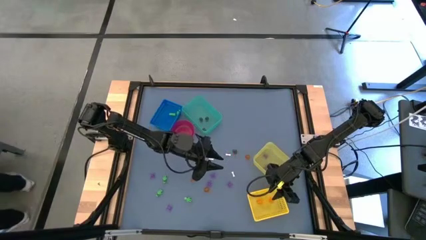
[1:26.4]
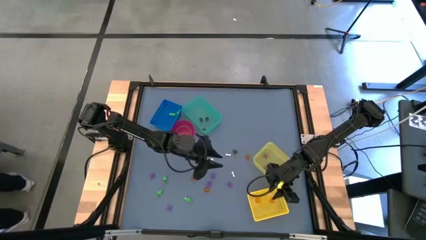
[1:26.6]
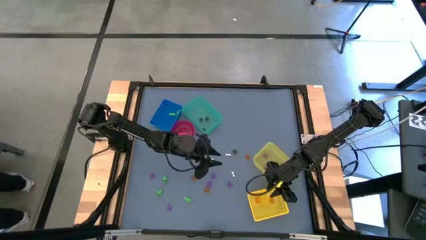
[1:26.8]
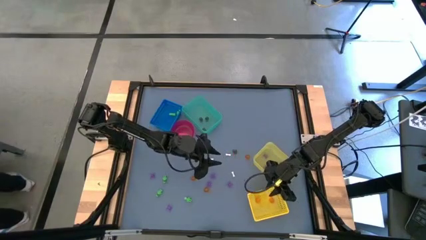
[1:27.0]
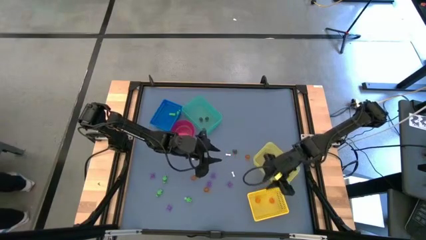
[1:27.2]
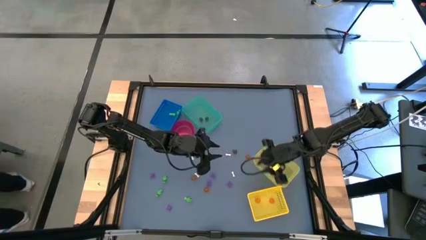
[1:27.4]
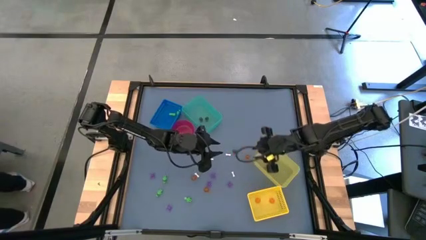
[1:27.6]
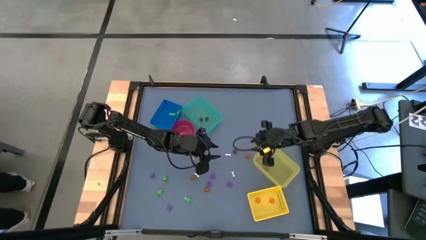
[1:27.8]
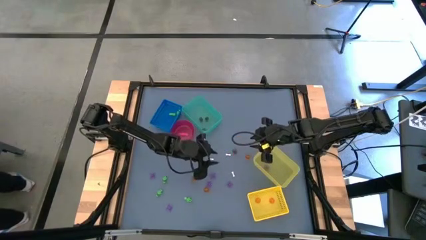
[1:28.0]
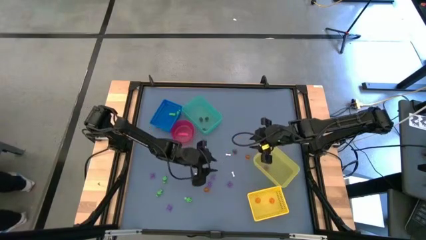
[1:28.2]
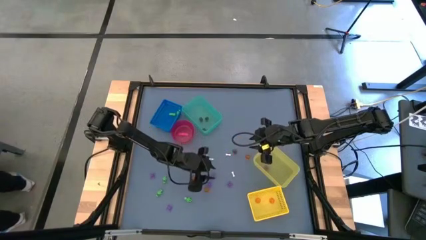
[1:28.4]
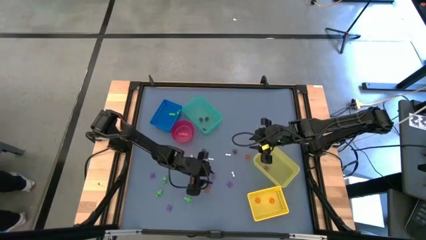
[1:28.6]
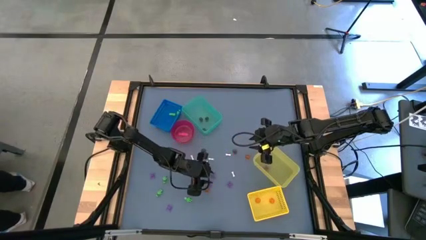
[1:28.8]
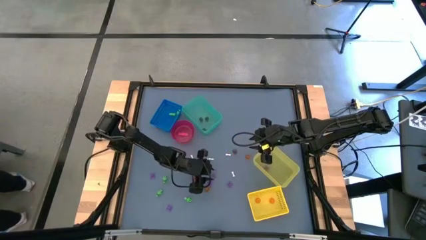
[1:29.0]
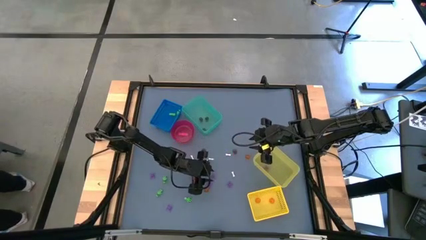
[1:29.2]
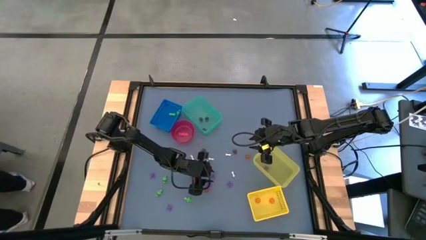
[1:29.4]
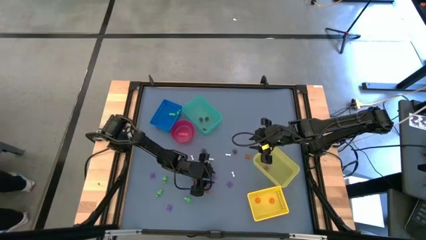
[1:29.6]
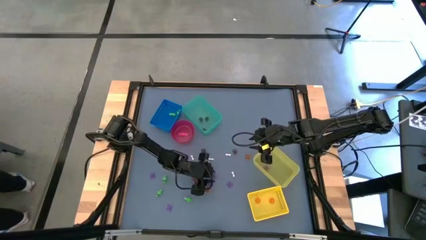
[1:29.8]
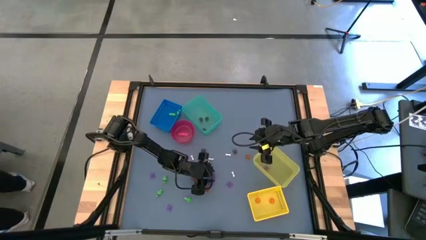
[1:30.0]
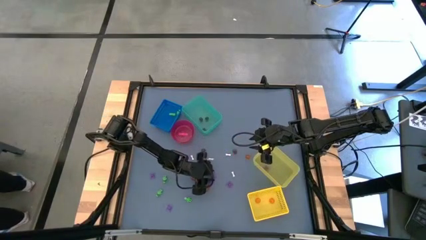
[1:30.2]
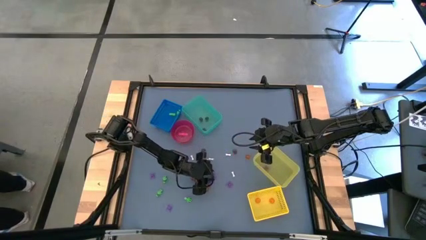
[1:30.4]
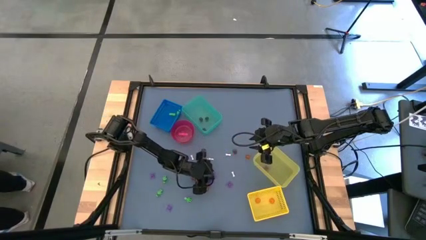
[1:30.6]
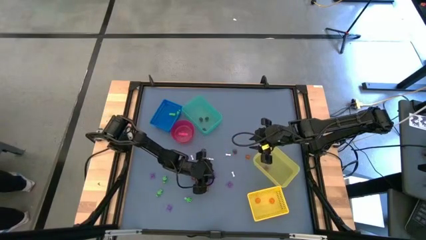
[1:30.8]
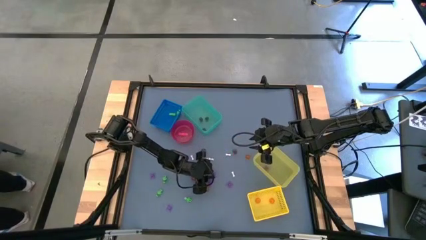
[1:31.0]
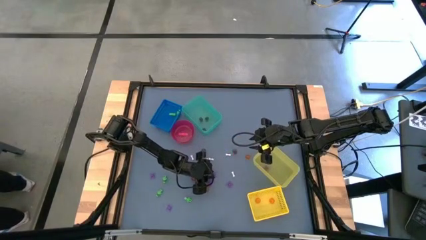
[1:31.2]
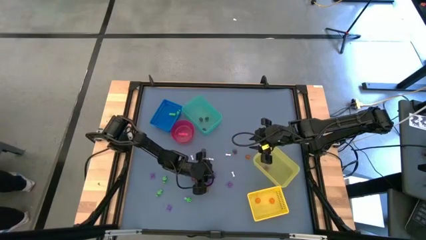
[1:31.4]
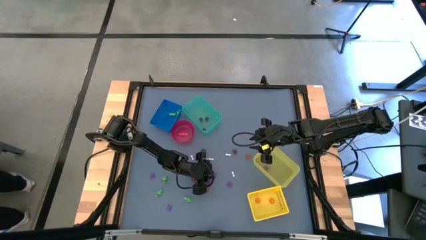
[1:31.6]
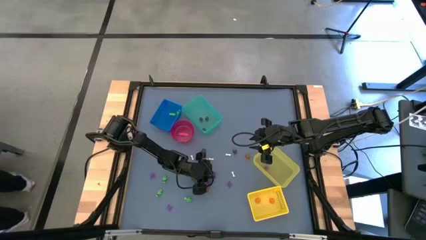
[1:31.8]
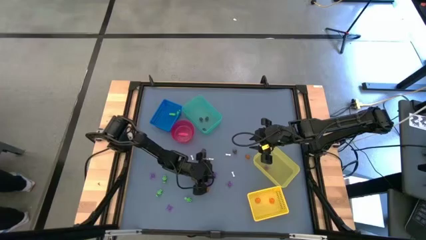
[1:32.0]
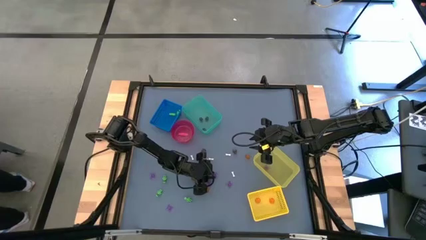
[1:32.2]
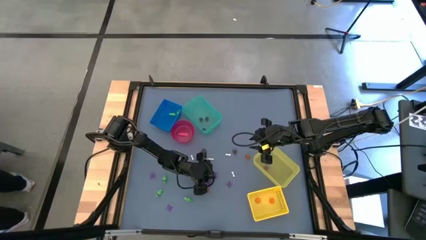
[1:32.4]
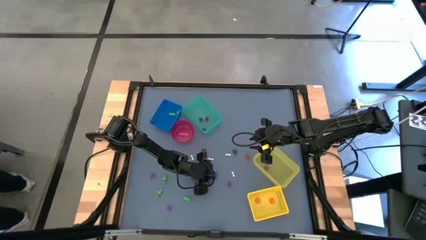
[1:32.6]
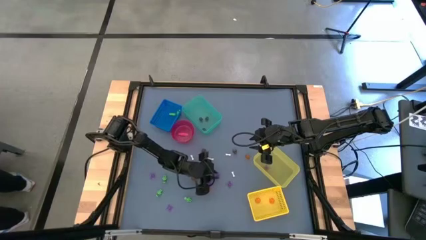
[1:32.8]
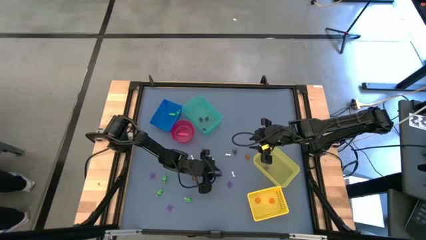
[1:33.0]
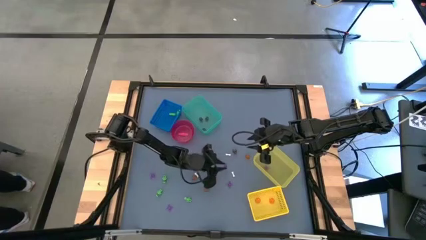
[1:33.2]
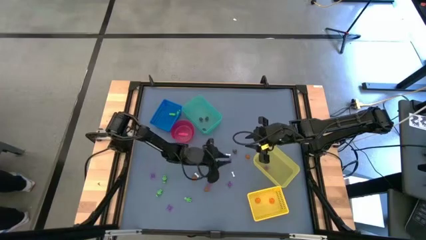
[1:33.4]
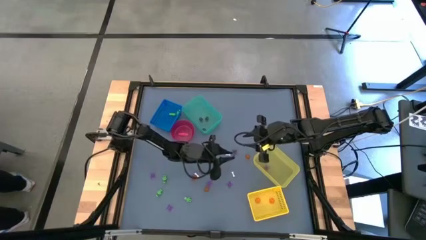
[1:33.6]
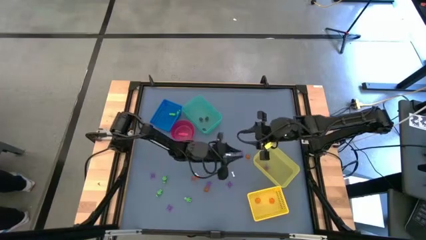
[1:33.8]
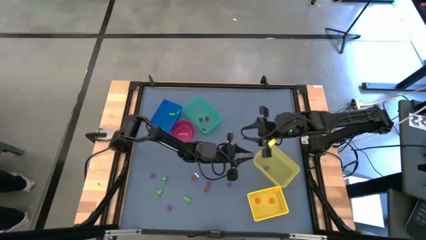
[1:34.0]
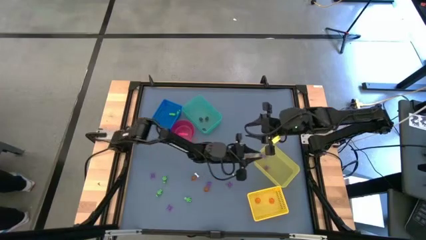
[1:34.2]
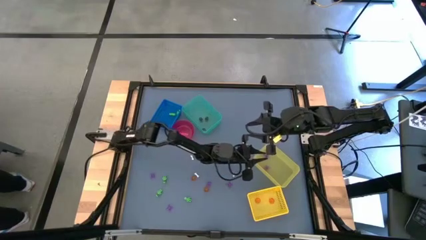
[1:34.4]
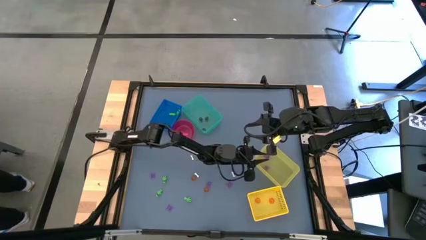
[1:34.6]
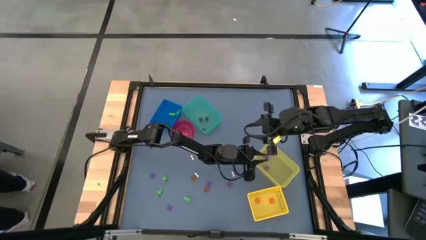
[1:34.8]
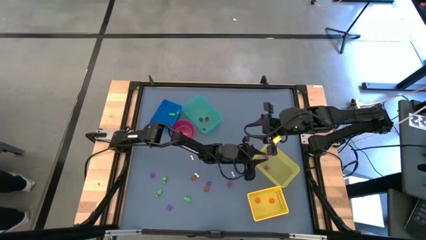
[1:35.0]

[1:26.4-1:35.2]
Task: Sort Halloween decoration
Put the purple spider toy into the yellow bin

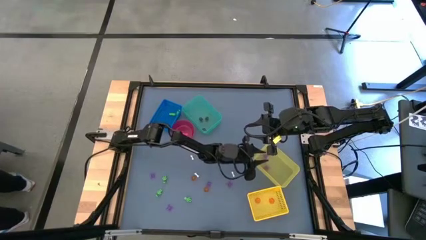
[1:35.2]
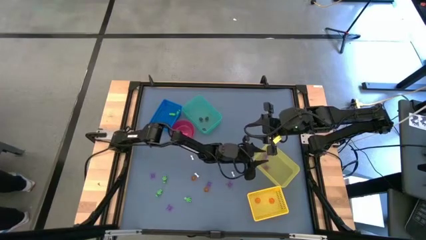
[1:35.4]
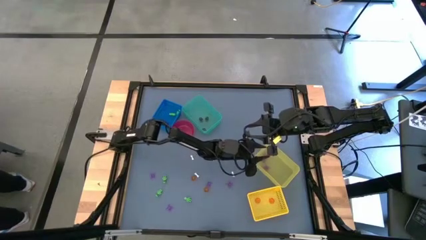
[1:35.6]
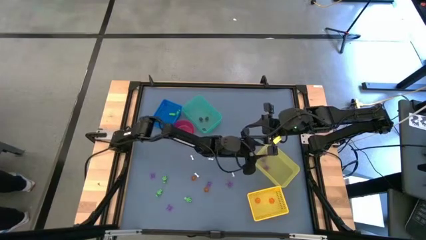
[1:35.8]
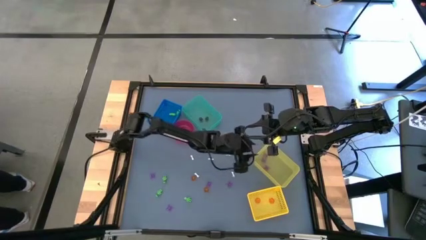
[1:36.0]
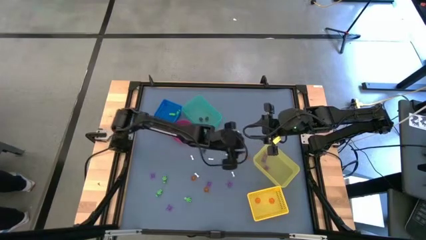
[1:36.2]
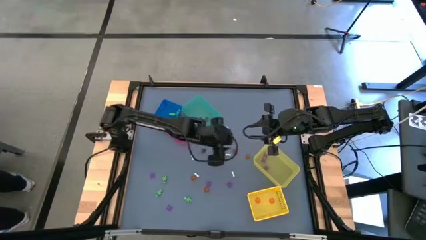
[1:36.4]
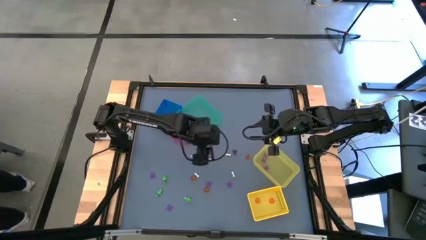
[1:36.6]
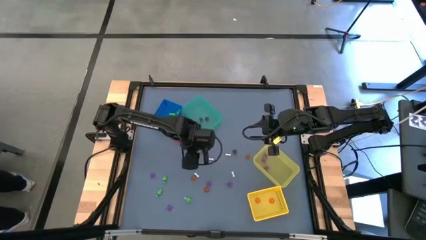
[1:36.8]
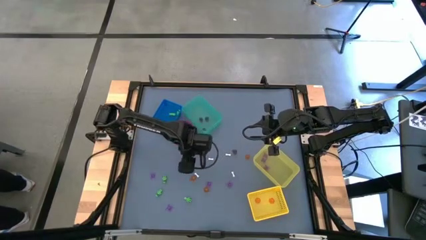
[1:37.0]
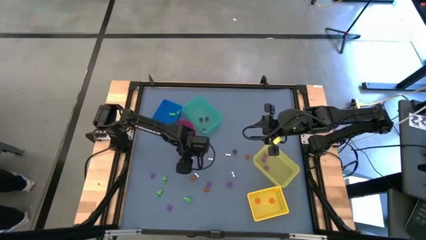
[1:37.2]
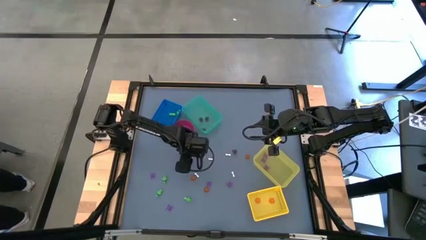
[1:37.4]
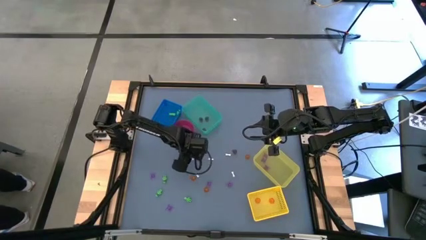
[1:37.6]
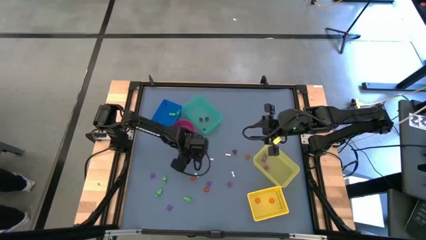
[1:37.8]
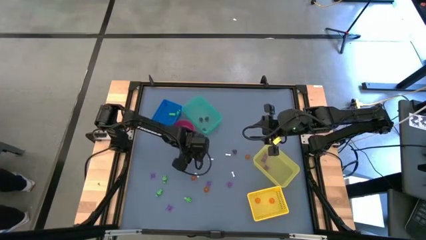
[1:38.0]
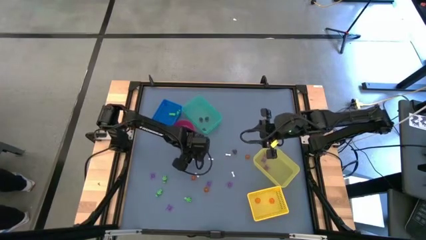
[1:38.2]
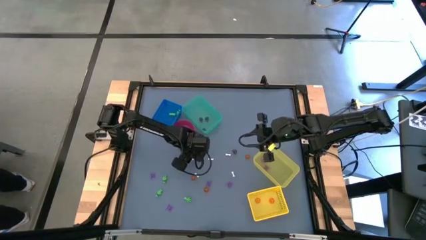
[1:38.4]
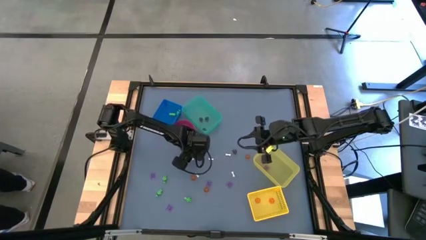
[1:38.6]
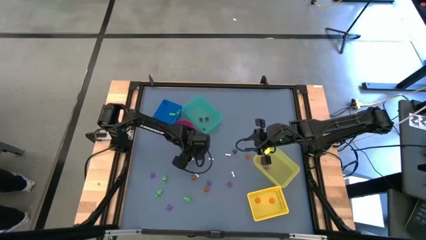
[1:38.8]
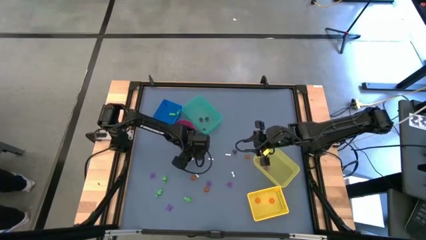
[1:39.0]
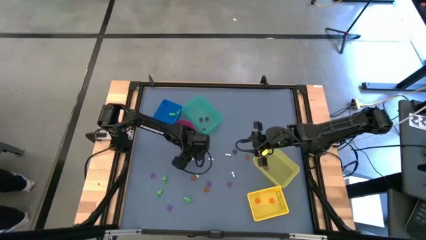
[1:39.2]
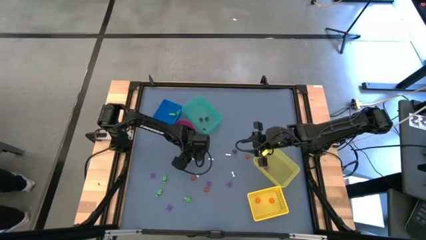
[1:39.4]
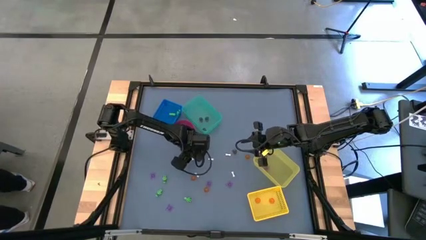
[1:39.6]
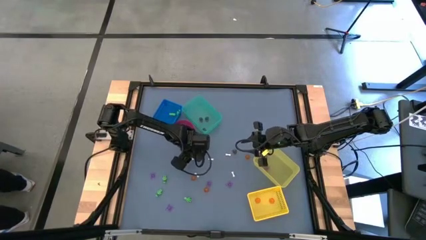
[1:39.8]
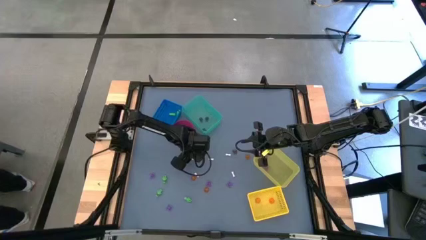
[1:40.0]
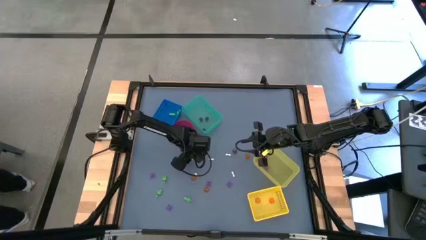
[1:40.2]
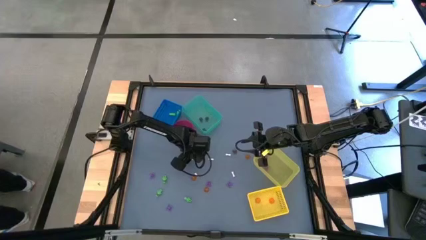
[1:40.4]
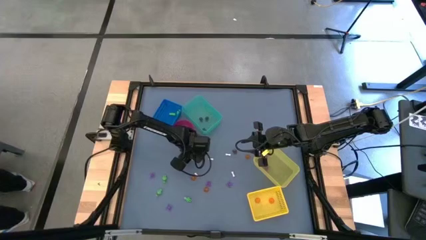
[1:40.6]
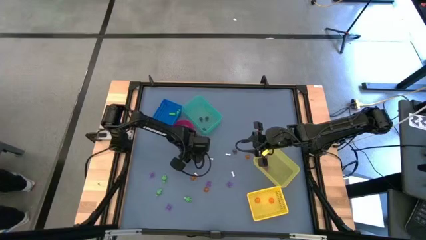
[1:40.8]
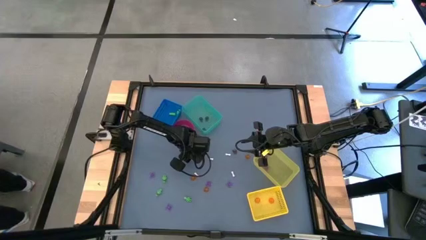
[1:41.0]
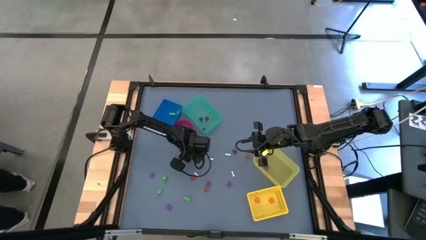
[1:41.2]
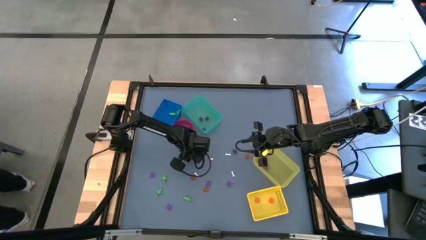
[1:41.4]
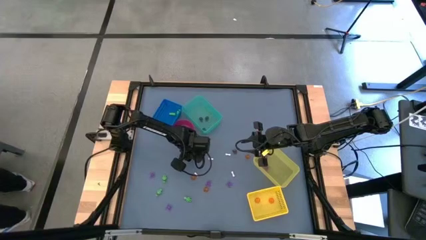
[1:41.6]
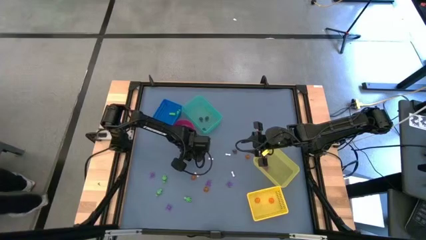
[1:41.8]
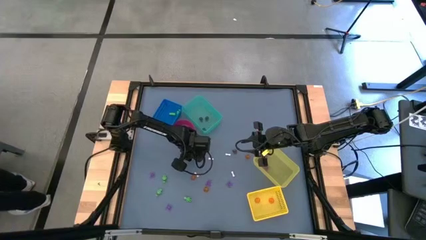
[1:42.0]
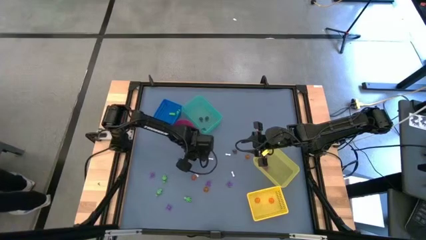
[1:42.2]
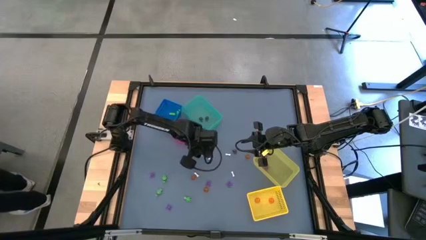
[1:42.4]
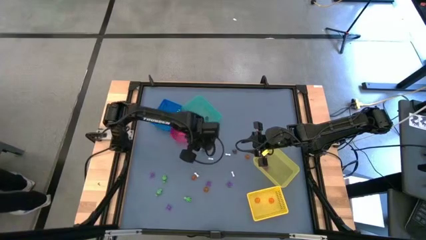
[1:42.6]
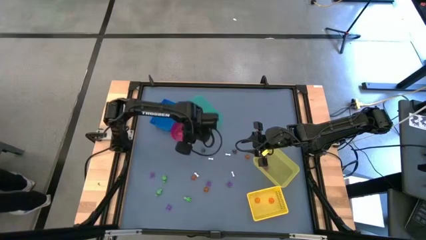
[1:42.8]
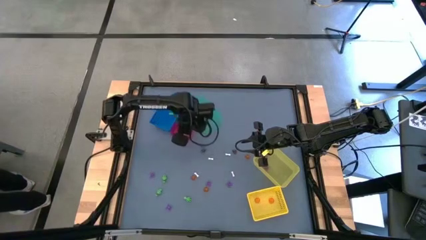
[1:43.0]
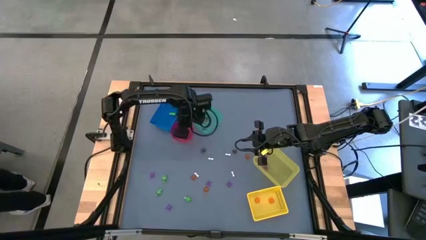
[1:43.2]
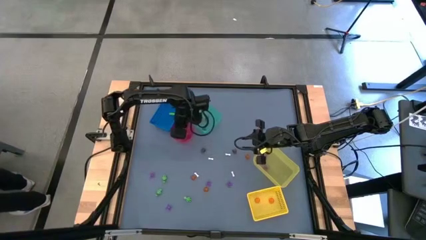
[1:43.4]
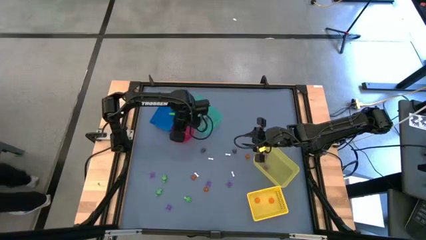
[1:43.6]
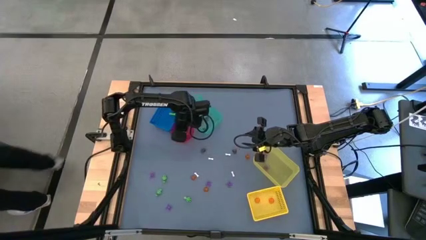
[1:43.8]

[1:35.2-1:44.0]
Put the white bone toy into the red bin
